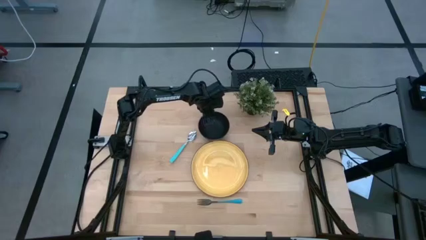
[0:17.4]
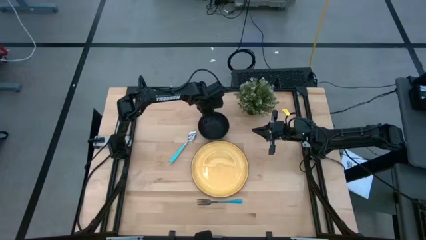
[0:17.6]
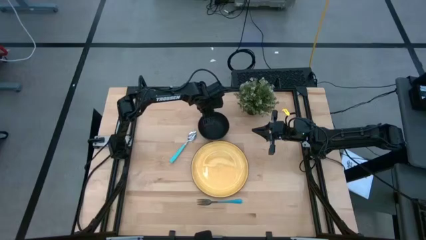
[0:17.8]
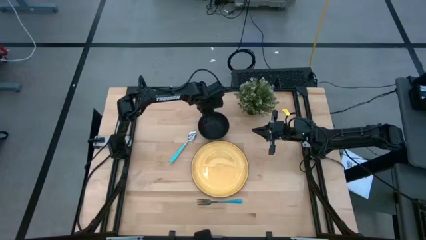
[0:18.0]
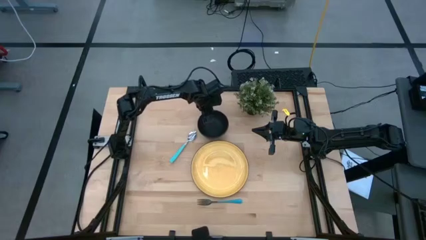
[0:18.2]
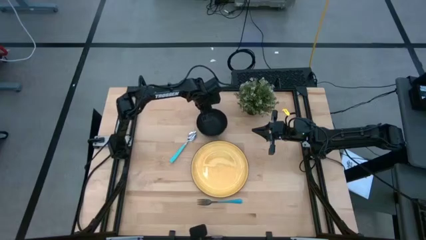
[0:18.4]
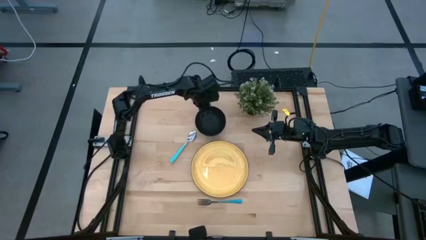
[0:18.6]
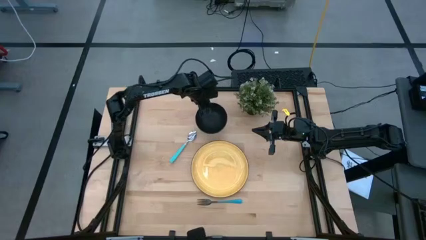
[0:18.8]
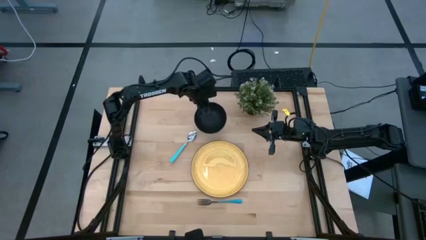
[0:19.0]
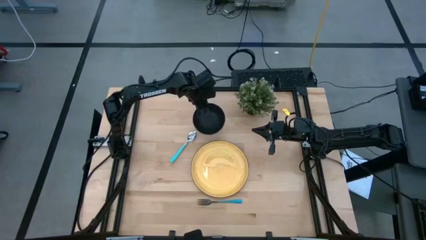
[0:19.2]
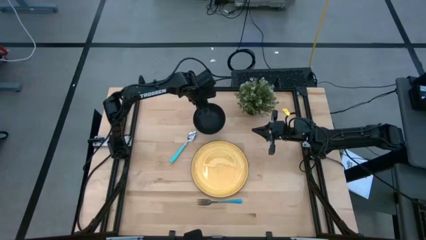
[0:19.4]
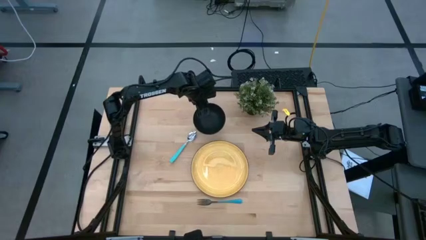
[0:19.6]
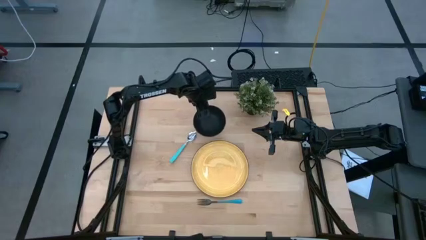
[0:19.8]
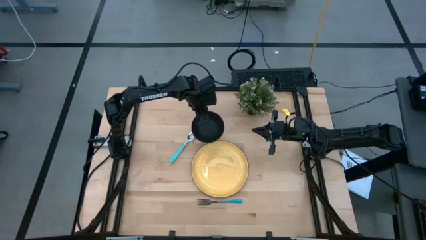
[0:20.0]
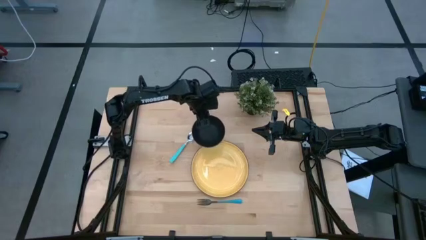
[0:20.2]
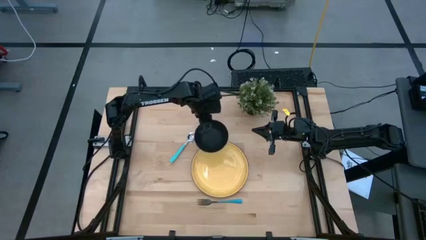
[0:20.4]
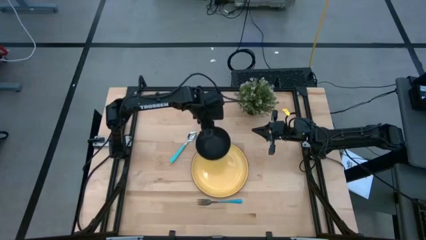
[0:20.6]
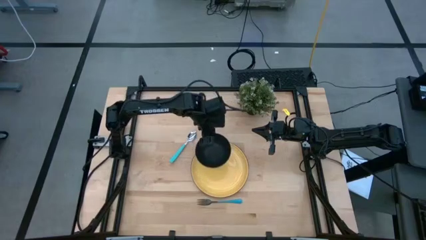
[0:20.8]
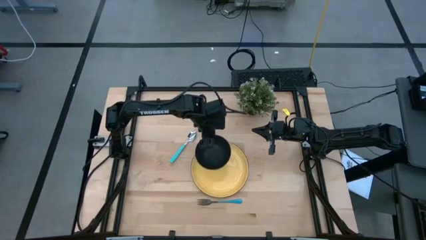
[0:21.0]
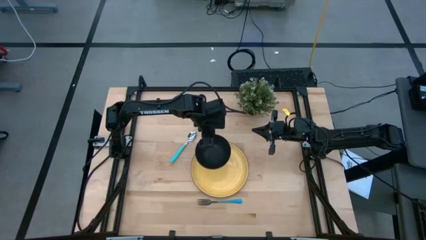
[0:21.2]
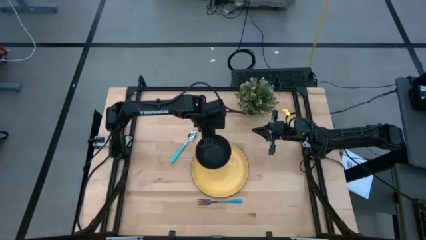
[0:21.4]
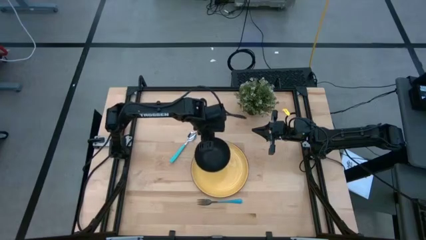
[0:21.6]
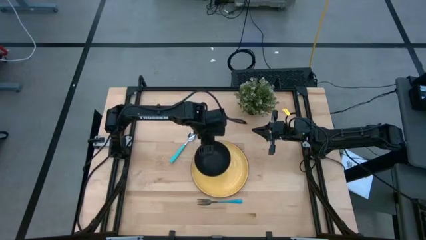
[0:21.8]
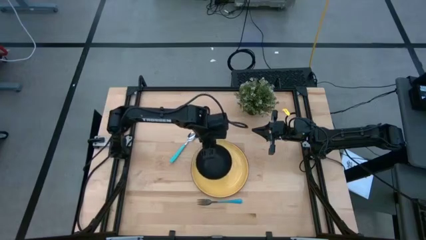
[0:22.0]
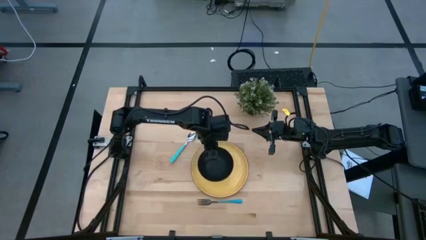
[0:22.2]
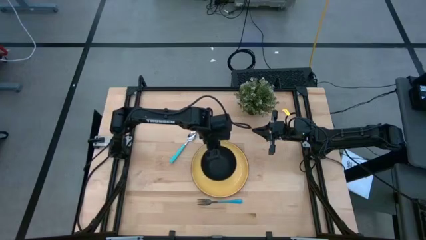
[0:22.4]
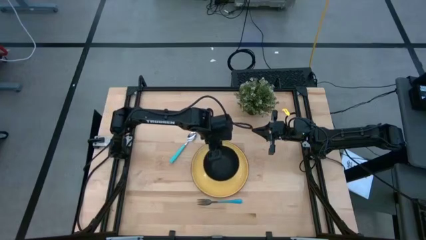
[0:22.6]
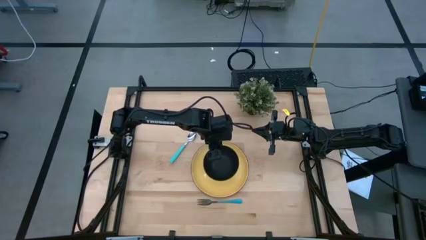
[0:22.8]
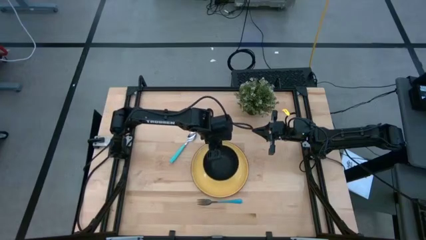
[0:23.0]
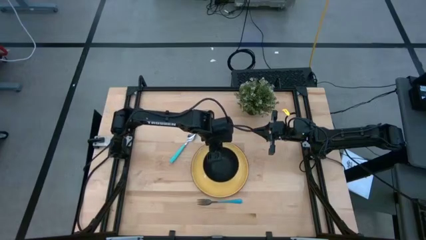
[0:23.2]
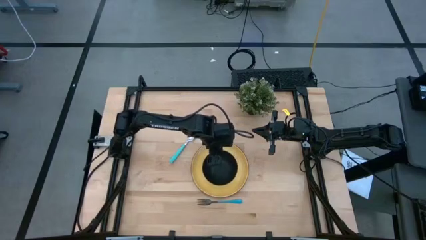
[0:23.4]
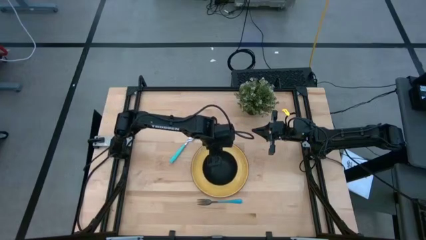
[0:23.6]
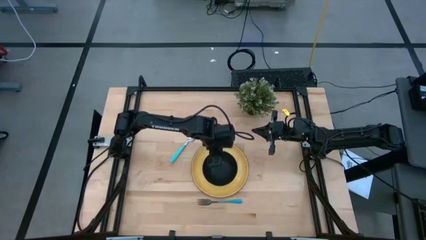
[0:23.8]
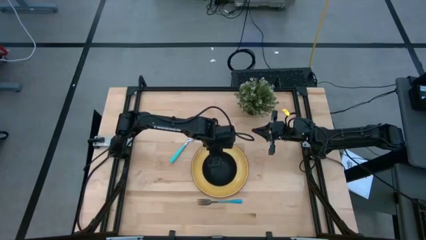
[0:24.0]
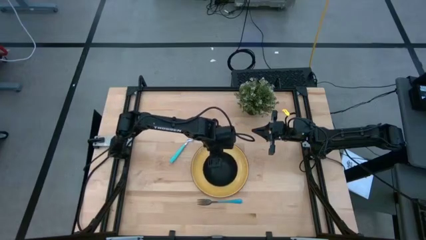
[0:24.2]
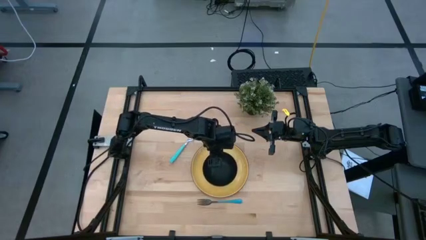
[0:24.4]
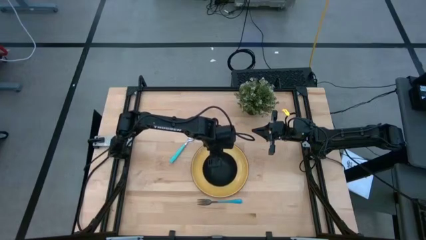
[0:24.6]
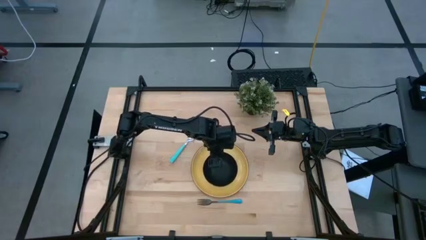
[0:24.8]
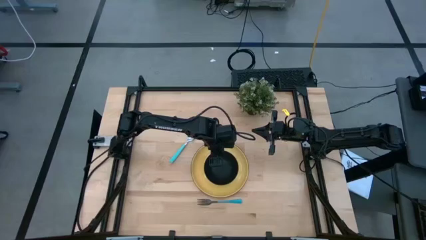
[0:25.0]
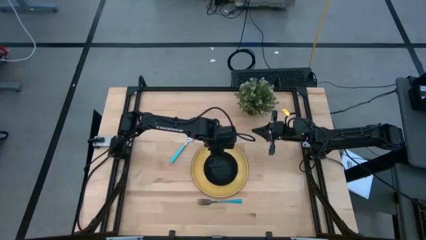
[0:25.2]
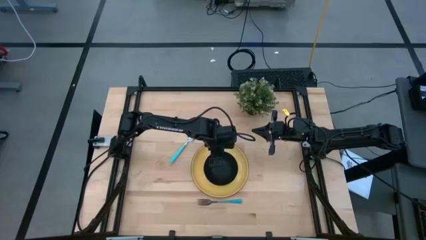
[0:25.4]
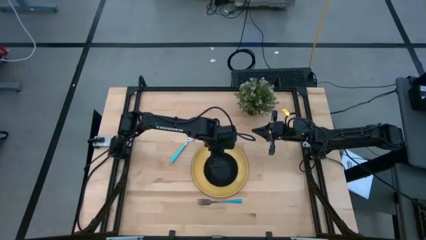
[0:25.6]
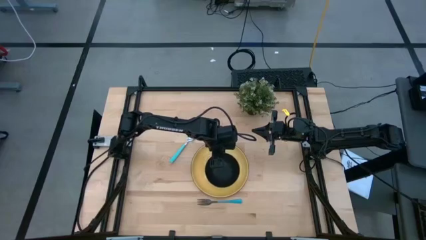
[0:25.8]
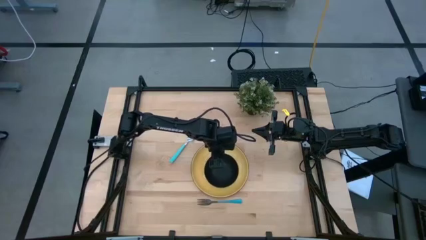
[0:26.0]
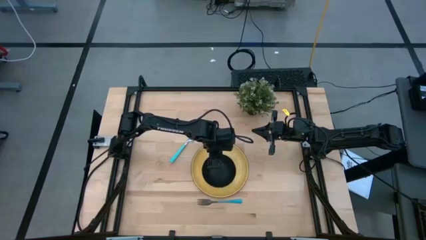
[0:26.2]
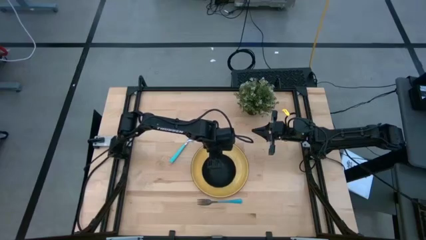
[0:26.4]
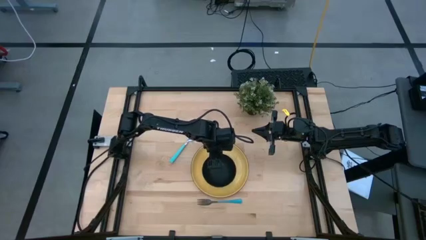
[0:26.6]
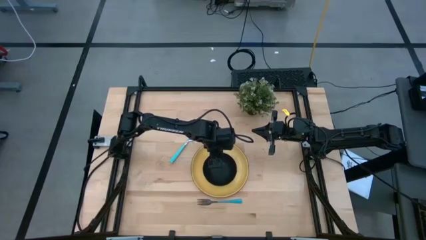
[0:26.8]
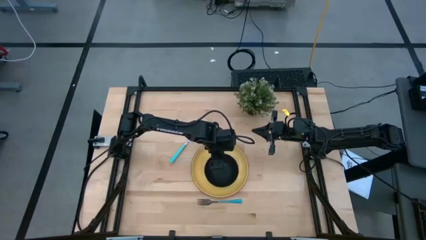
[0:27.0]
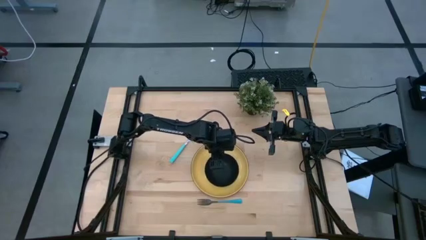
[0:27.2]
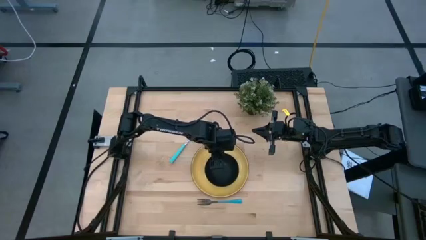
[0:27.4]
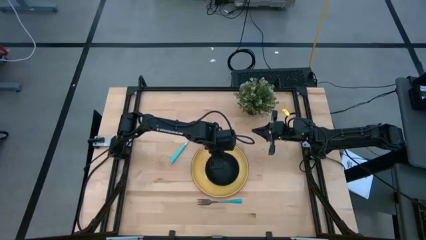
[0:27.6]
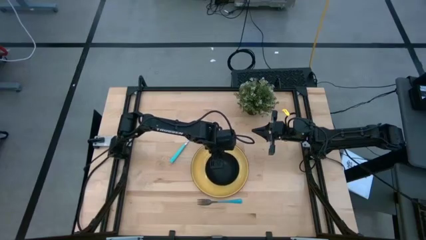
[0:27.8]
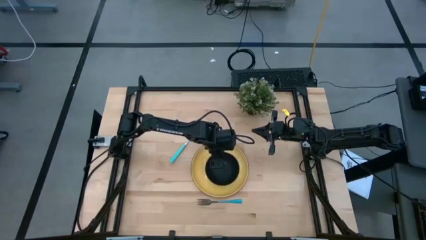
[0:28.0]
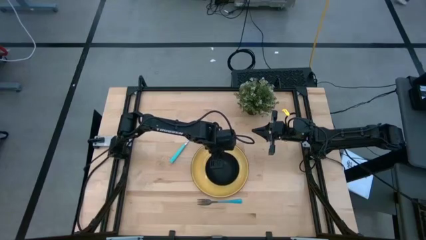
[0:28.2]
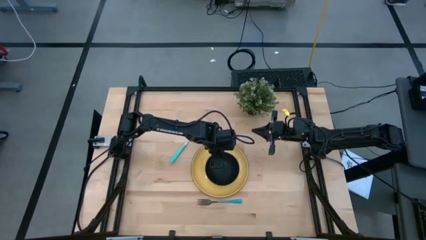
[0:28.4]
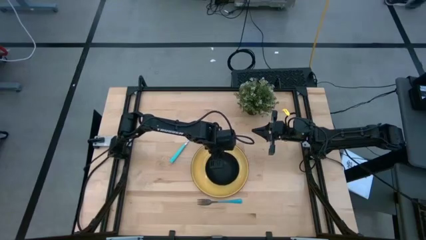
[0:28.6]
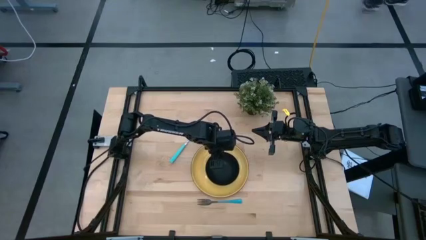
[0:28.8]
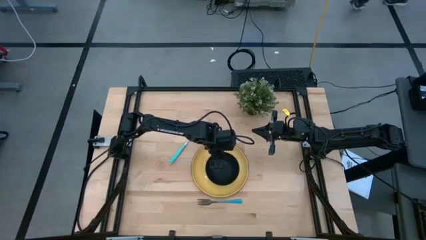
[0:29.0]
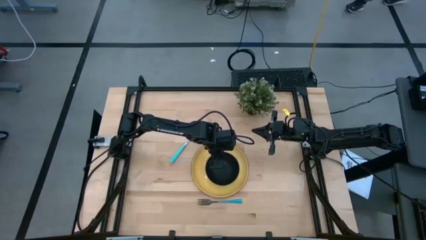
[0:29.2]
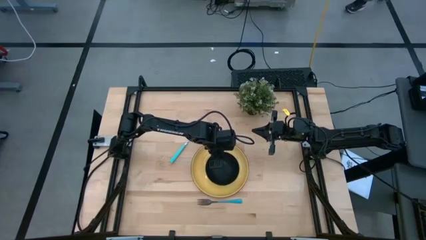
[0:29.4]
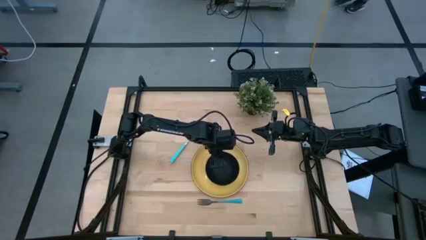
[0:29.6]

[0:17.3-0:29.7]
Task: Set table place
Put the black bowl on the yellow plate
